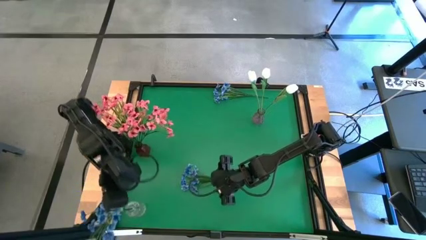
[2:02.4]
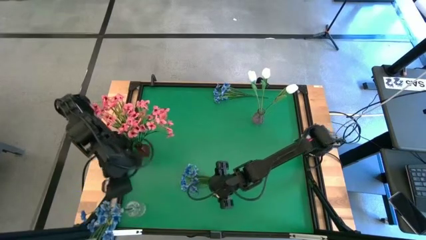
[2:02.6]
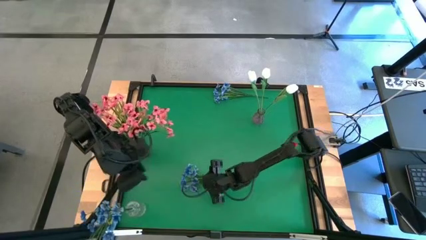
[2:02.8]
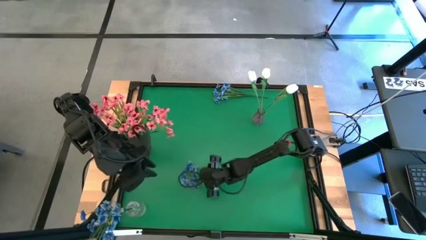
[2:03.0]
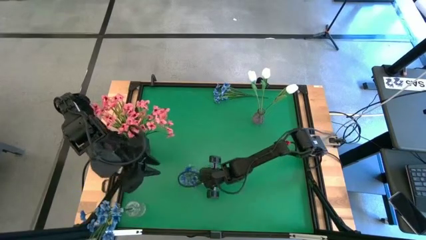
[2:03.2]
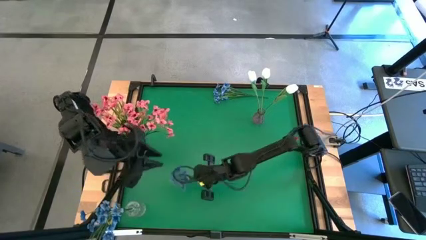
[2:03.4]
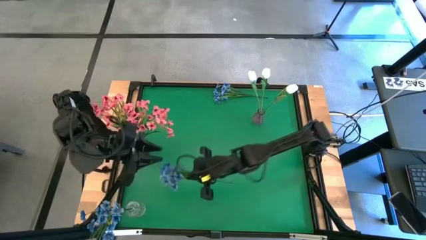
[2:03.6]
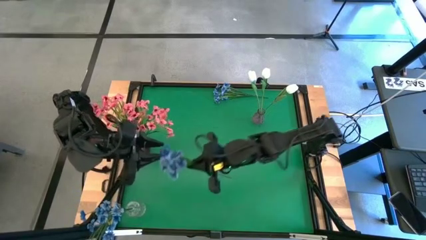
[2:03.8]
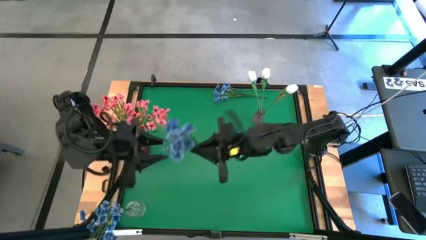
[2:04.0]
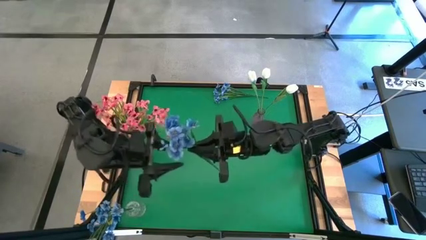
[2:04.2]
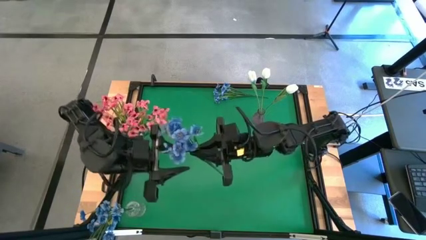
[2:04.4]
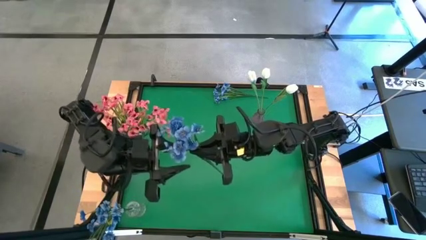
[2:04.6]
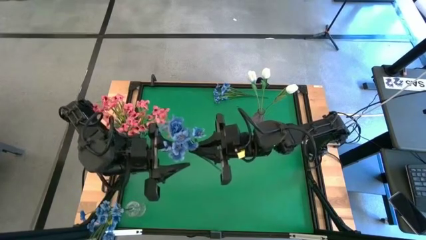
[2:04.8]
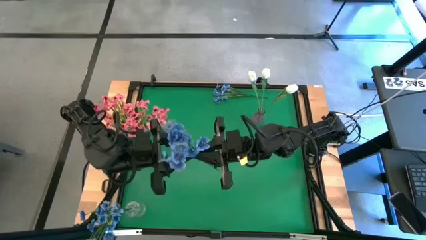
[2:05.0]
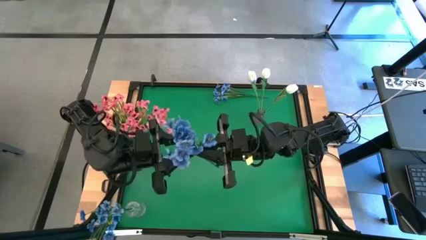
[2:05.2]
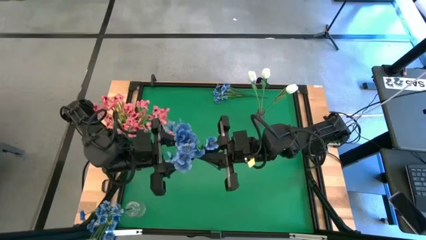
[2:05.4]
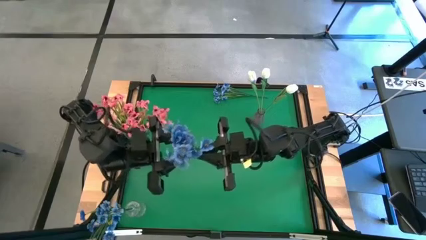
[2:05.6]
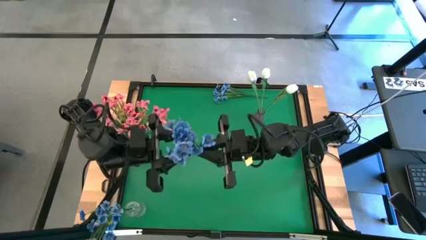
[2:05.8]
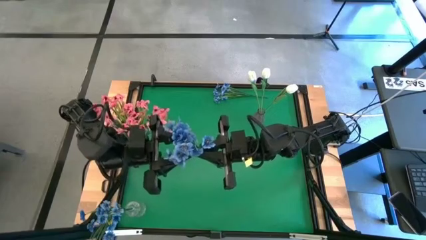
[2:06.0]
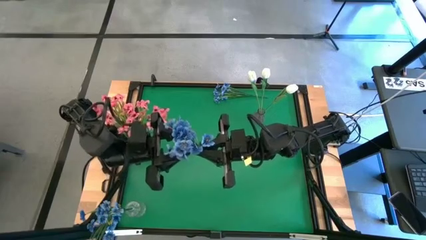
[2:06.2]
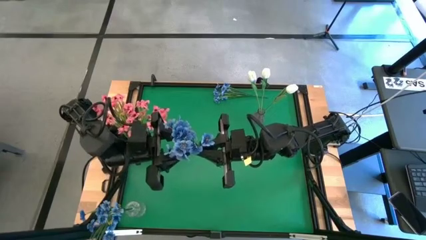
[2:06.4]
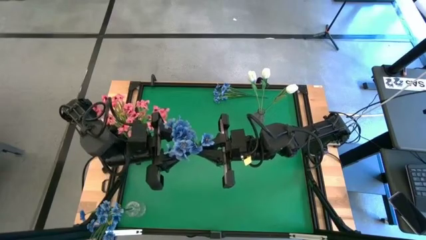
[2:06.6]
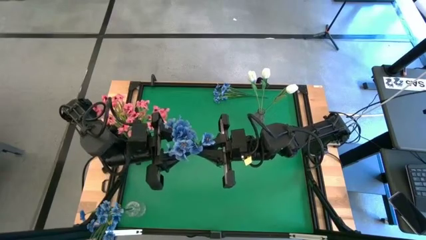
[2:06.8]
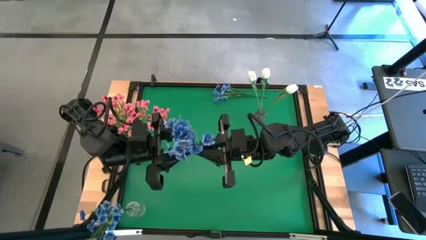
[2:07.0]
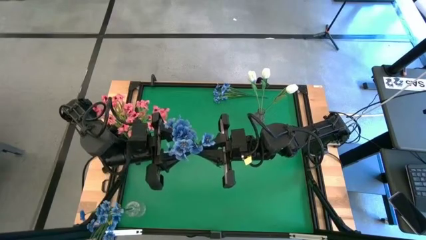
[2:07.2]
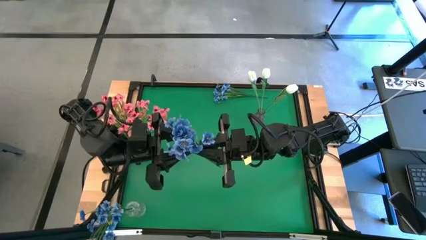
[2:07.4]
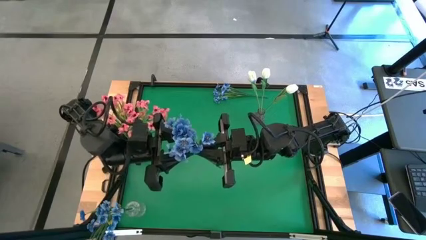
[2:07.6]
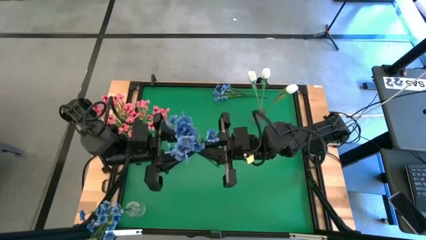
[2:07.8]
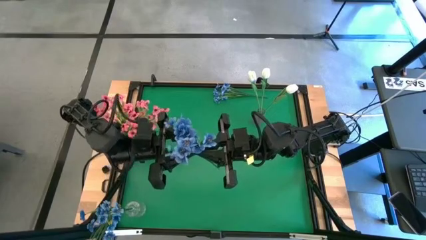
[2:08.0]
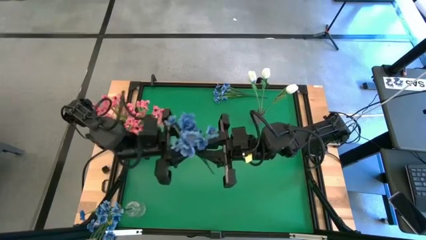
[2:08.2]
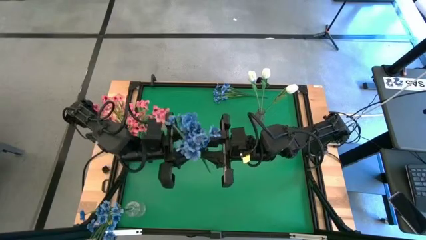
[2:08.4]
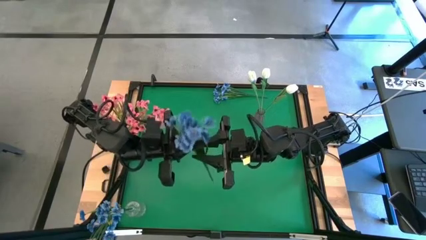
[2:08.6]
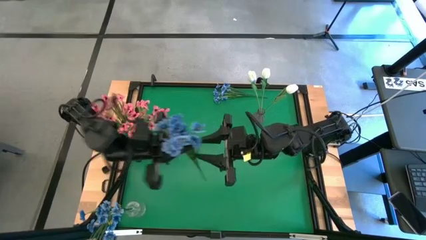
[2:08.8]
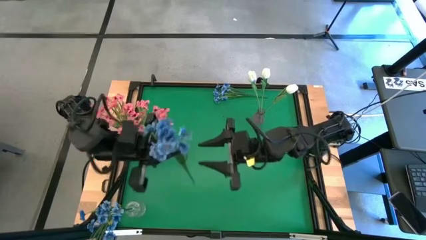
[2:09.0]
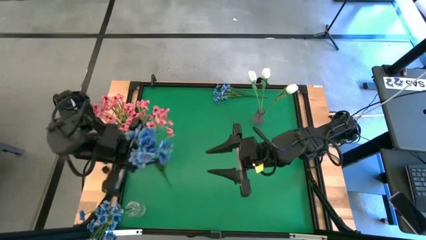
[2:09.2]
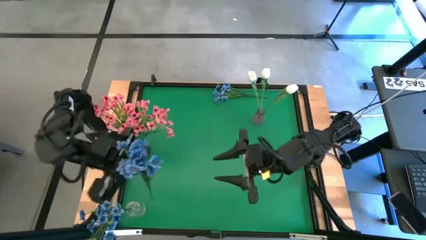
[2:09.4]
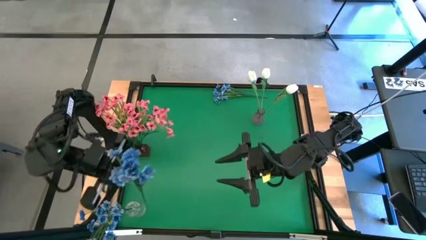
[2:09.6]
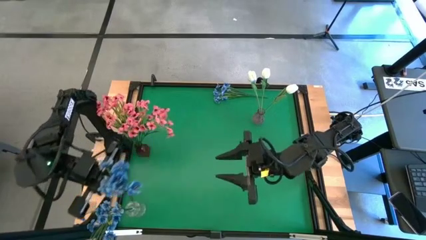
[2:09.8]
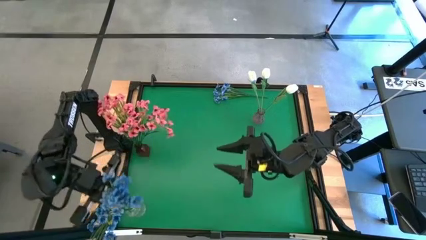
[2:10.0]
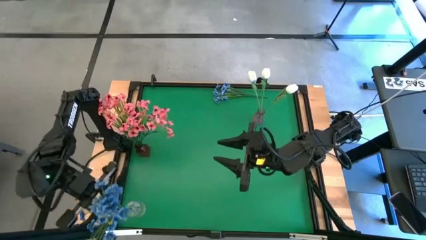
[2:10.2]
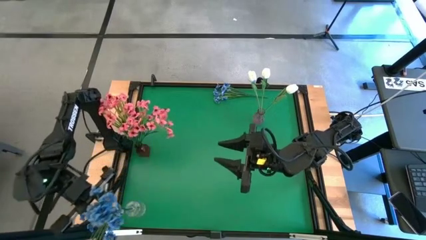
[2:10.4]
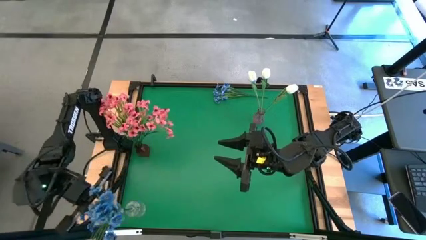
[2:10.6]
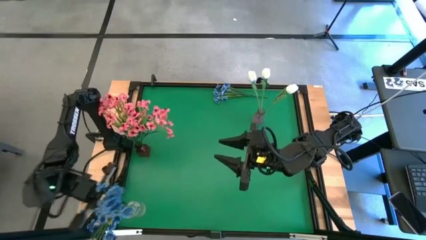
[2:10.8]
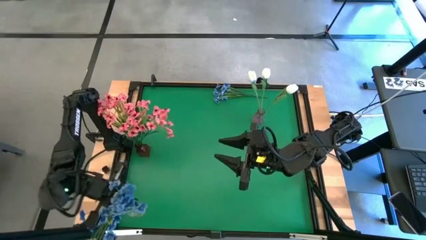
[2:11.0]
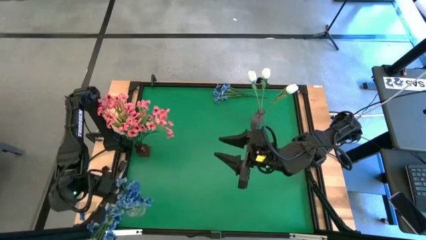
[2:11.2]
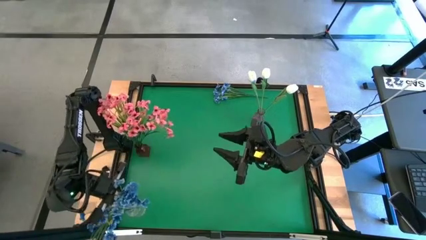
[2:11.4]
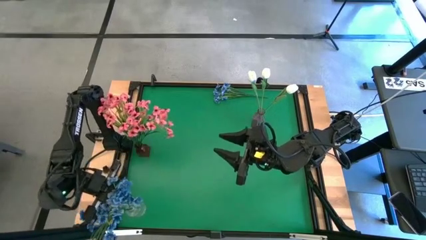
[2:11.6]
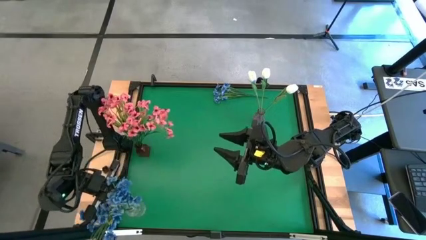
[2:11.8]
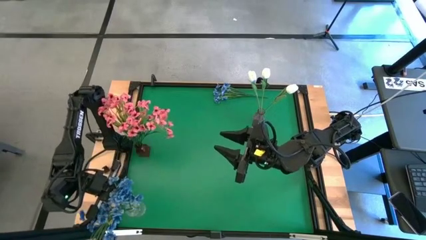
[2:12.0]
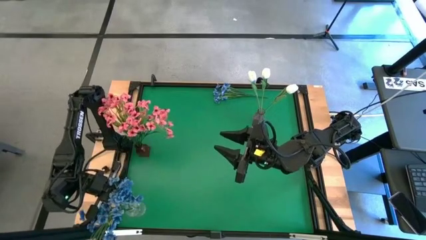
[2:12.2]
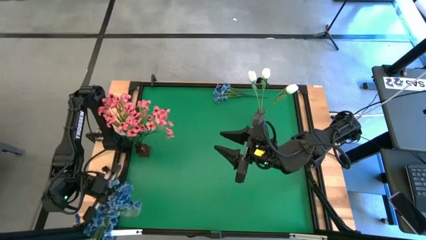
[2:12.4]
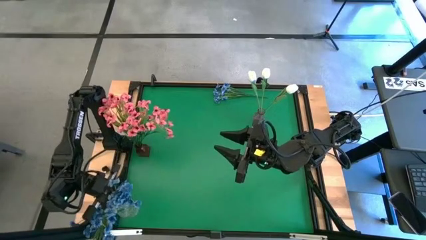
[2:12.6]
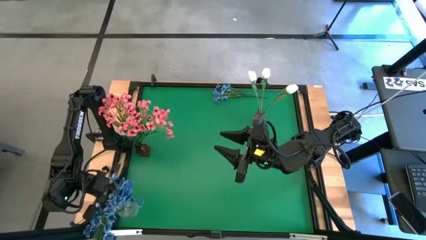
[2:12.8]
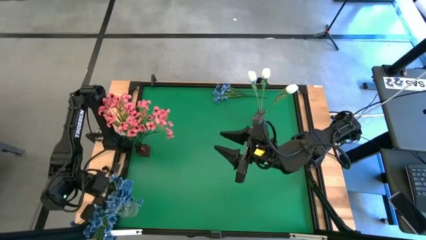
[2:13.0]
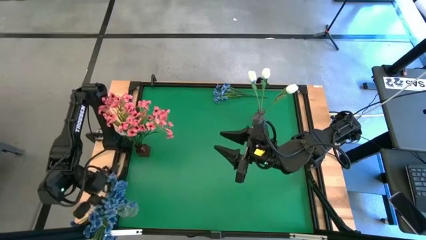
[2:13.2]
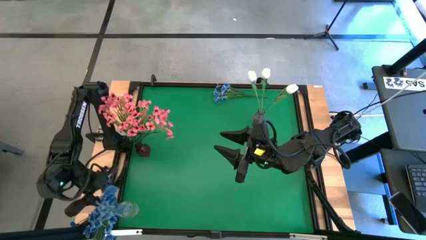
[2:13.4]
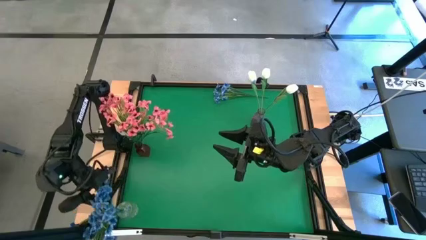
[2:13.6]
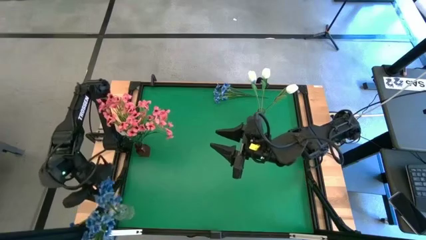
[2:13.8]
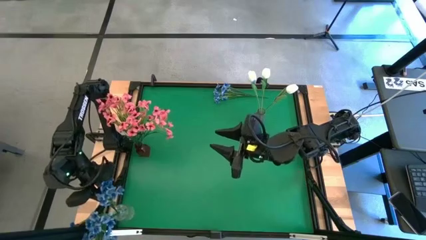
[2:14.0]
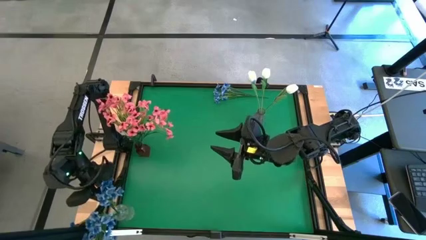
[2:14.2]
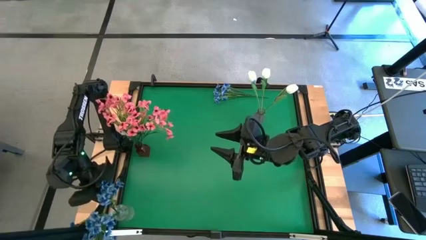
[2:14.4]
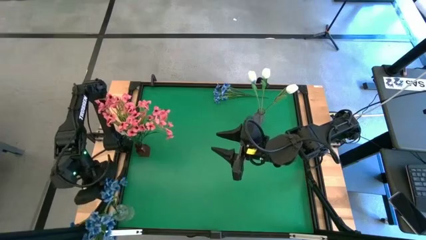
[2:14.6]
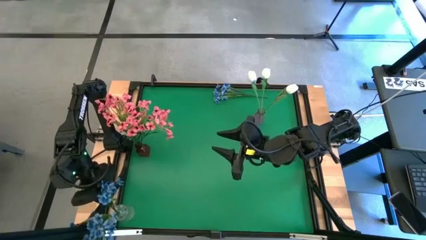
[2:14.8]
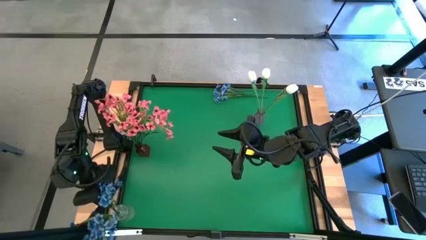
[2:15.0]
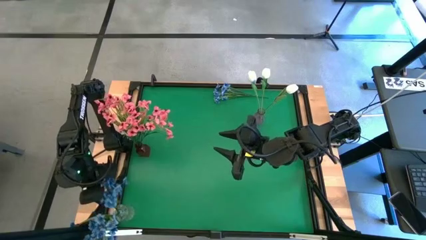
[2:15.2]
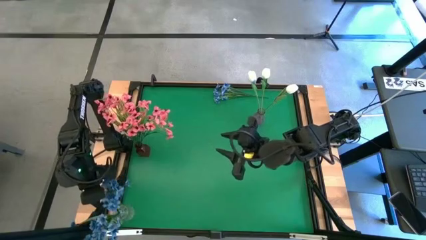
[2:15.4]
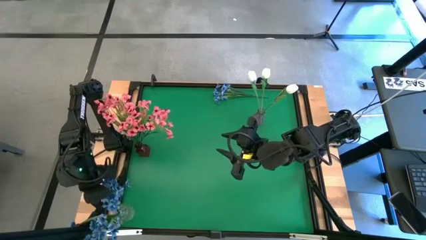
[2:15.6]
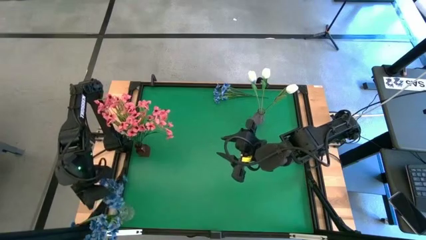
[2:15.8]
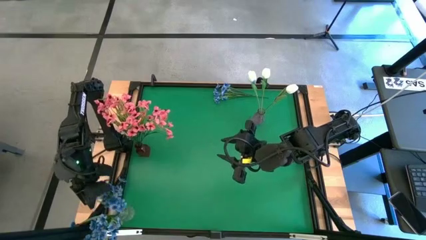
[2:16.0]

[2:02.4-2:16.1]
Task: Sort flowers into vase by color
Put the bottom blue flower into the transparent vase

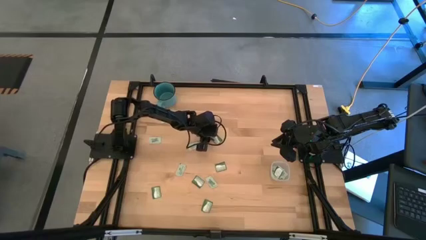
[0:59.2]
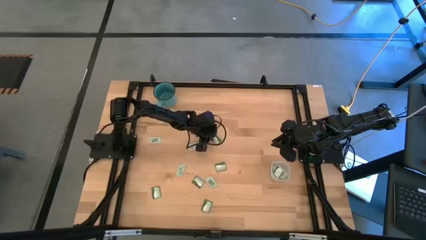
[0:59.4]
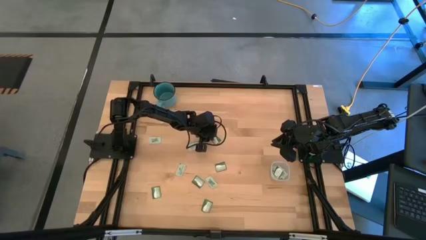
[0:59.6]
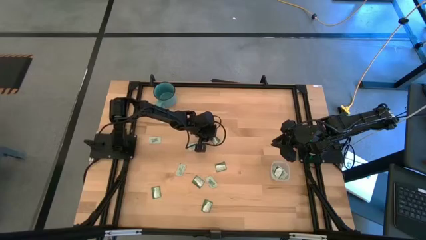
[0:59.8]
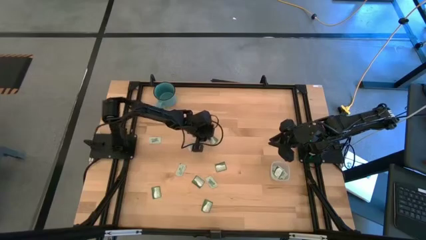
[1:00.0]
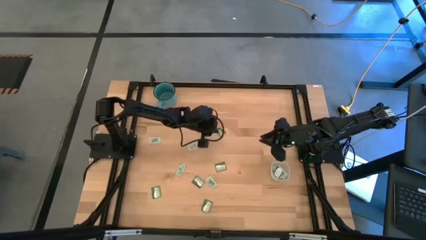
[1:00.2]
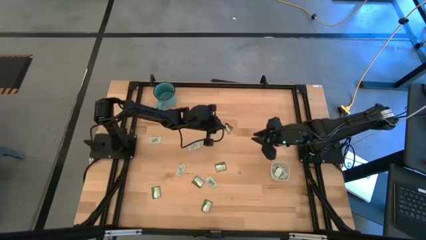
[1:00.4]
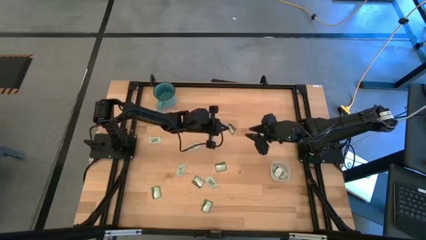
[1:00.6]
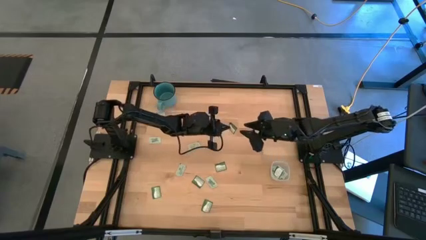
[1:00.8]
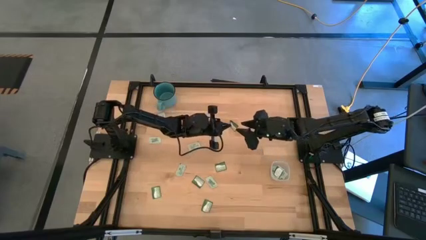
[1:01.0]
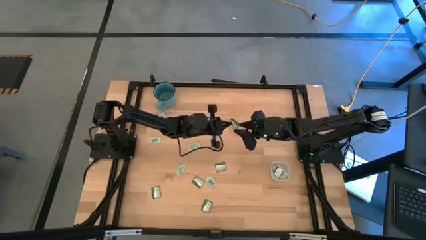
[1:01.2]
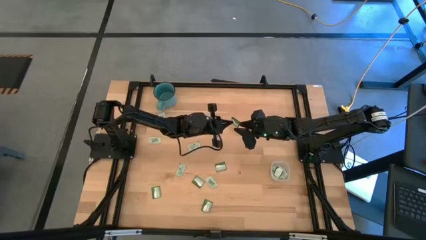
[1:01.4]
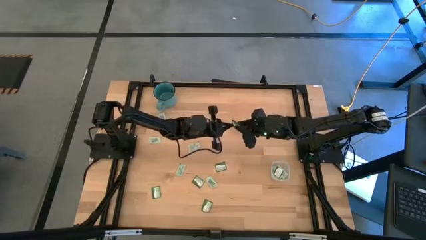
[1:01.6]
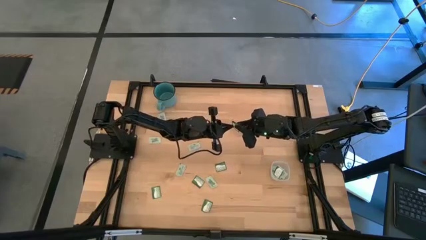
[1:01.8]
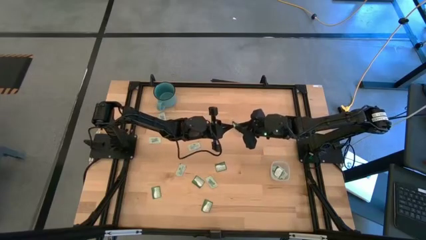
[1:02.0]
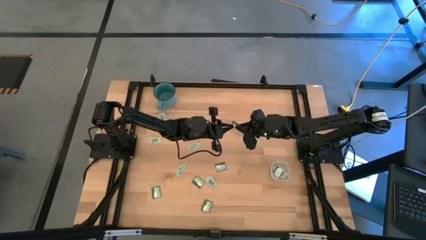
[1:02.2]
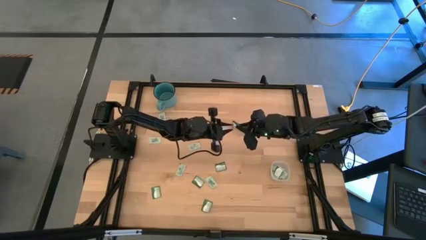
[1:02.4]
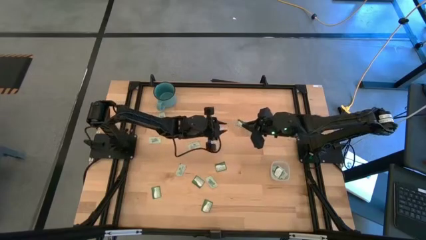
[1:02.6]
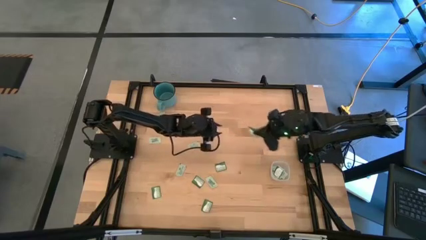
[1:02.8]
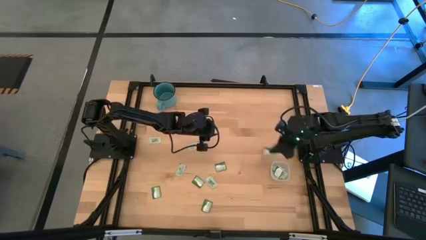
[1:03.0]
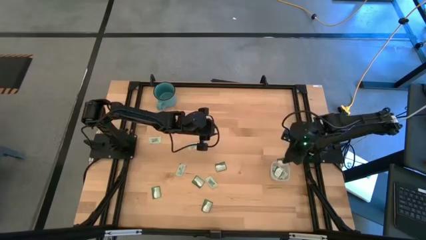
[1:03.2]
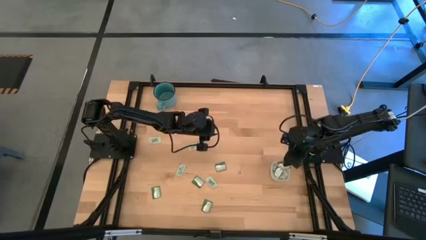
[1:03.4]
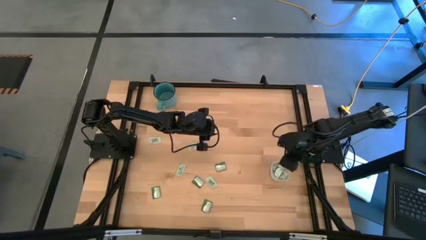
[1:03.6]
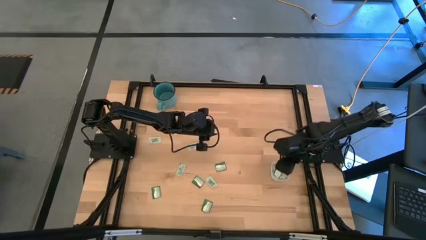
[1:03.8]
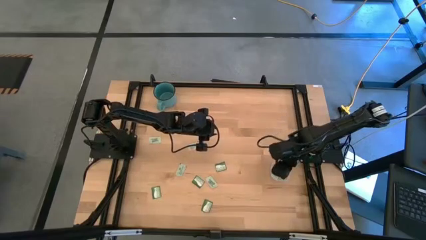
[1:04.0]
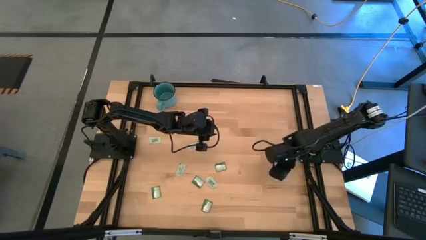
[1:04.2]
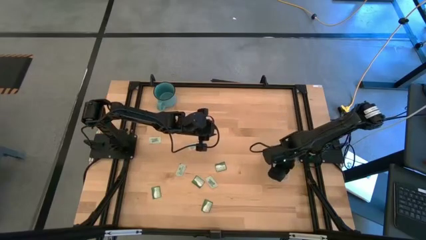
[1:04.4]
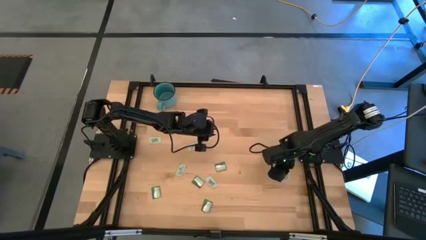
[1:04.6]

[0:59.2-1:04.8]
Task: Pick and place items into bin
Put the green stevia packet into the transparent bin
